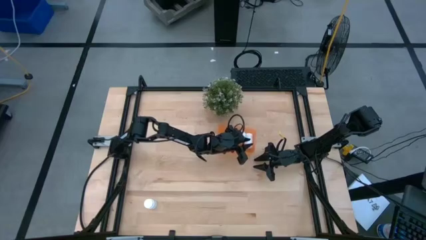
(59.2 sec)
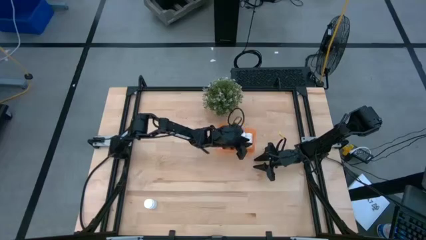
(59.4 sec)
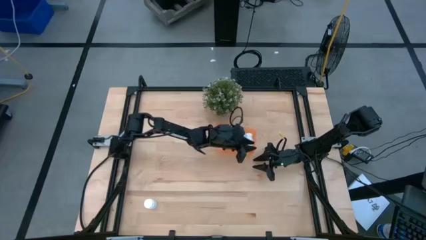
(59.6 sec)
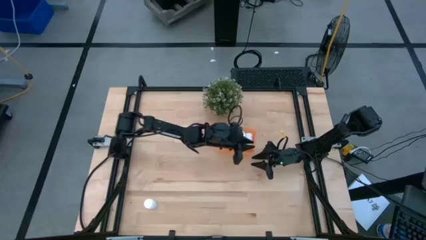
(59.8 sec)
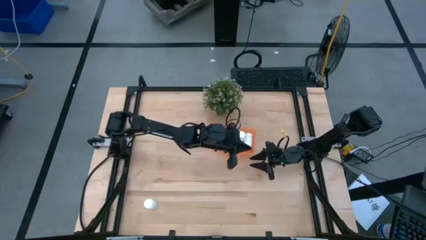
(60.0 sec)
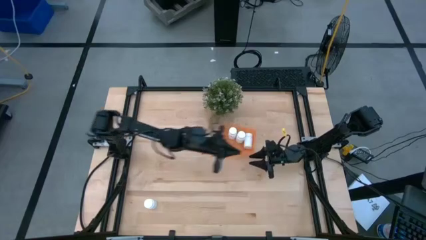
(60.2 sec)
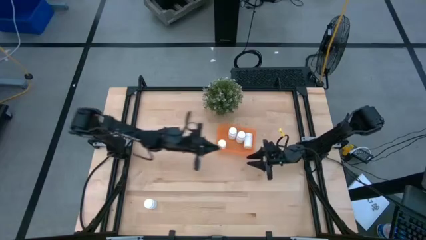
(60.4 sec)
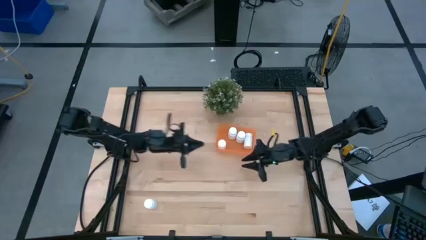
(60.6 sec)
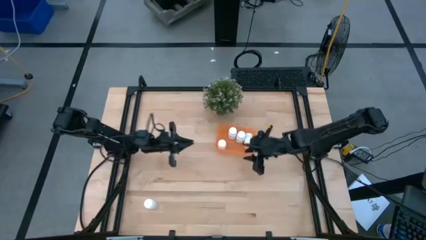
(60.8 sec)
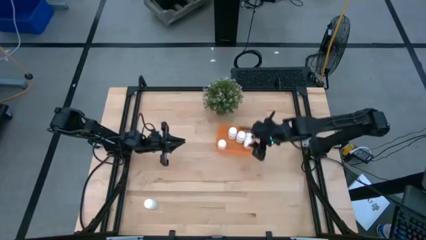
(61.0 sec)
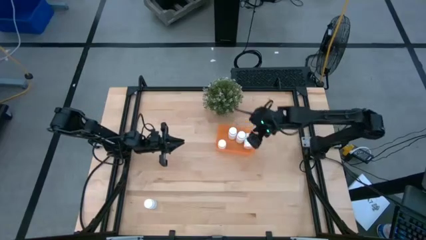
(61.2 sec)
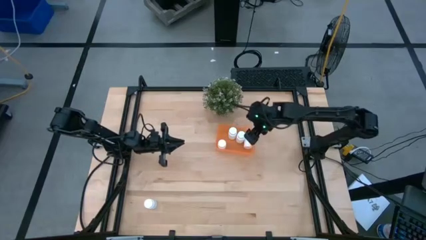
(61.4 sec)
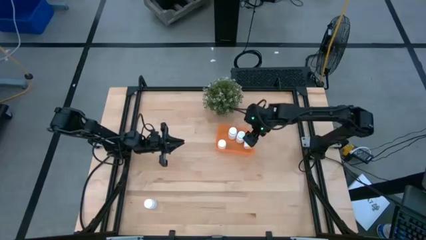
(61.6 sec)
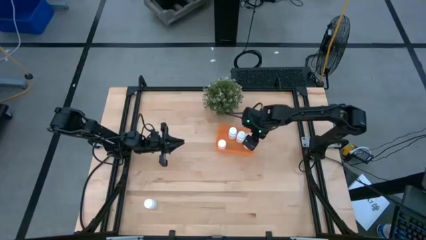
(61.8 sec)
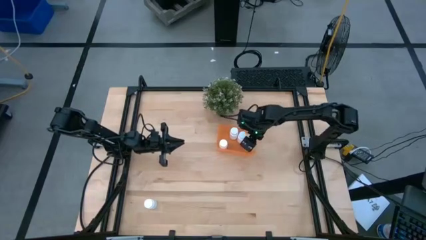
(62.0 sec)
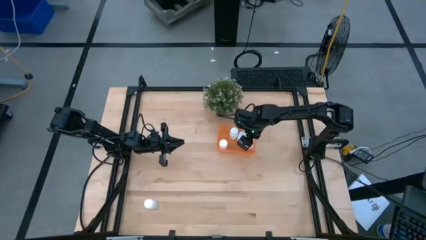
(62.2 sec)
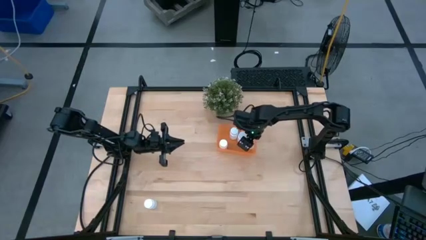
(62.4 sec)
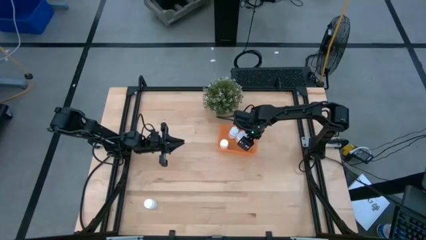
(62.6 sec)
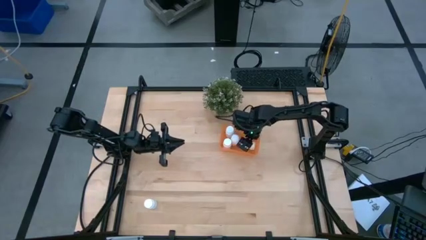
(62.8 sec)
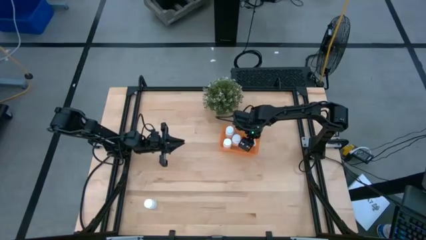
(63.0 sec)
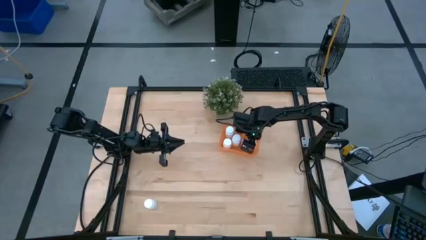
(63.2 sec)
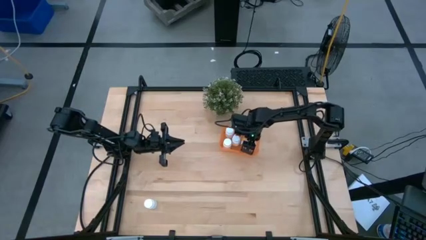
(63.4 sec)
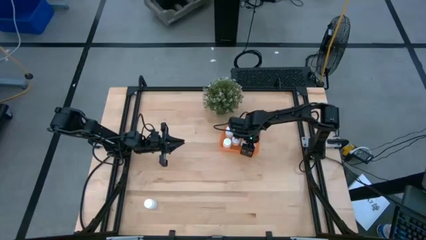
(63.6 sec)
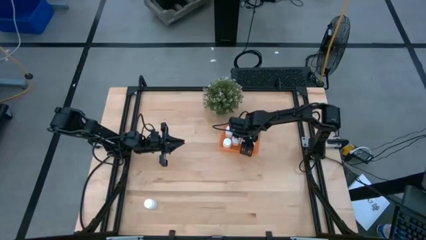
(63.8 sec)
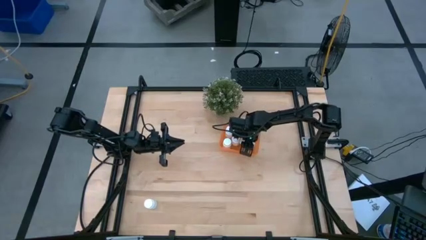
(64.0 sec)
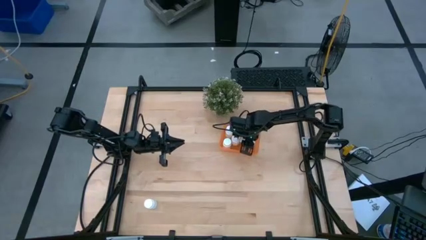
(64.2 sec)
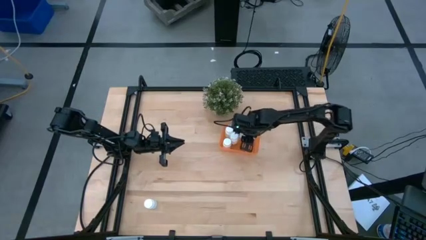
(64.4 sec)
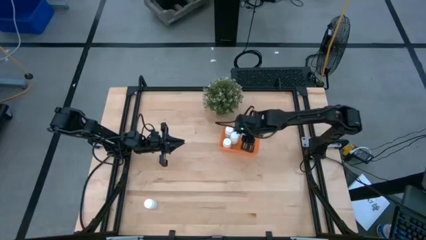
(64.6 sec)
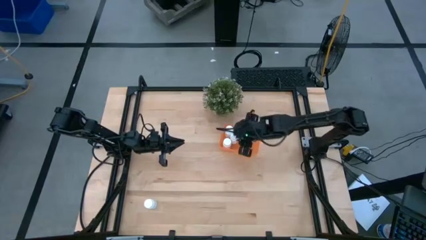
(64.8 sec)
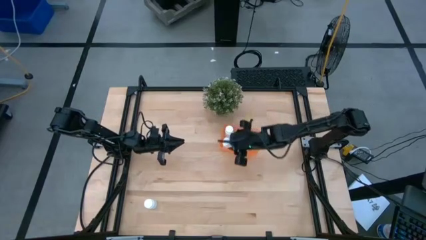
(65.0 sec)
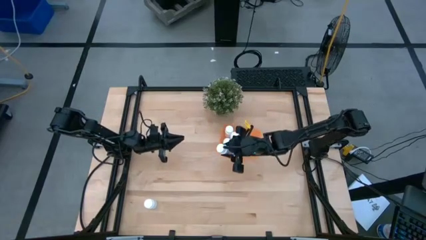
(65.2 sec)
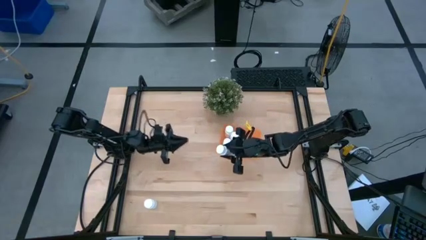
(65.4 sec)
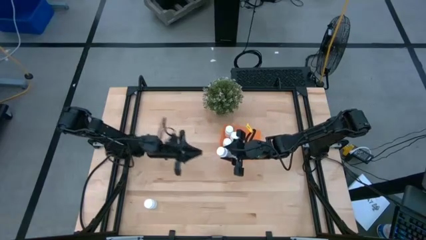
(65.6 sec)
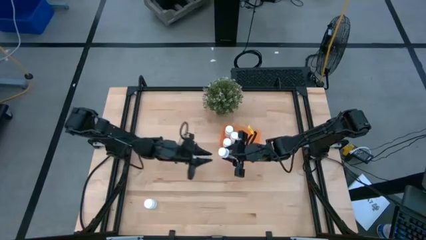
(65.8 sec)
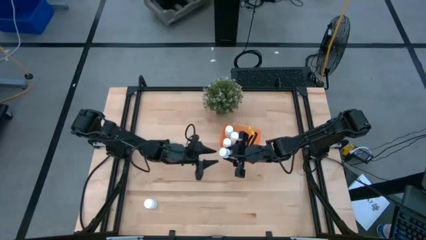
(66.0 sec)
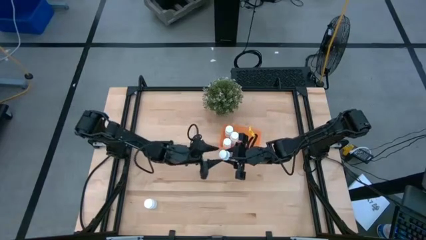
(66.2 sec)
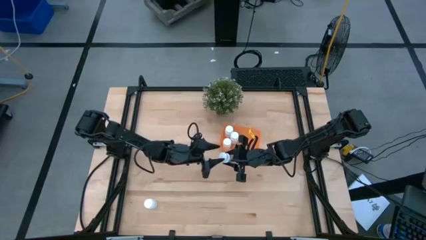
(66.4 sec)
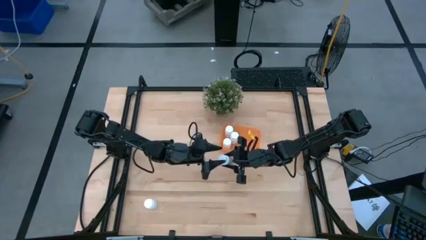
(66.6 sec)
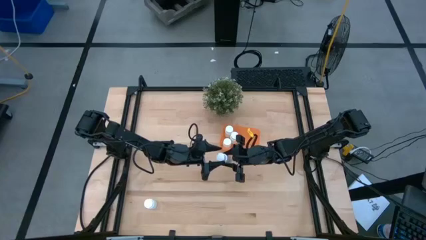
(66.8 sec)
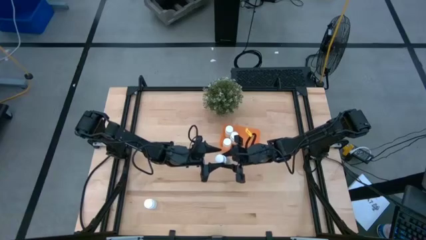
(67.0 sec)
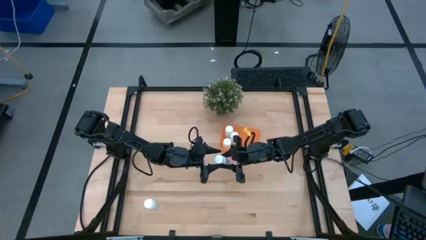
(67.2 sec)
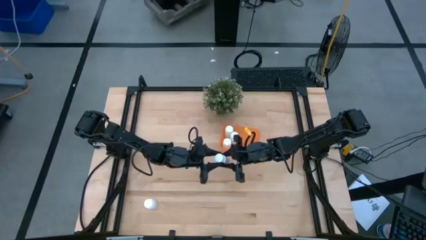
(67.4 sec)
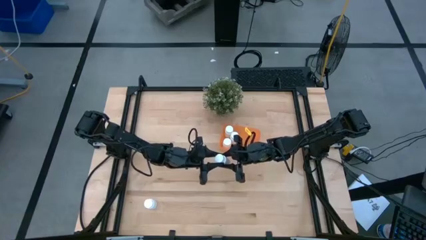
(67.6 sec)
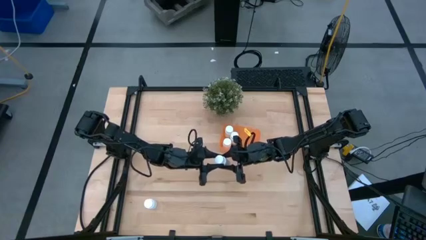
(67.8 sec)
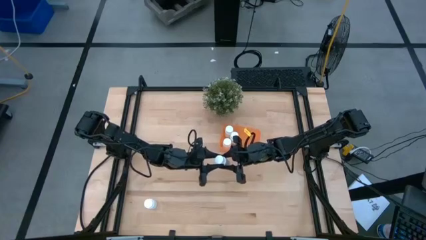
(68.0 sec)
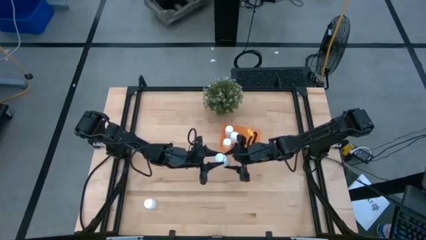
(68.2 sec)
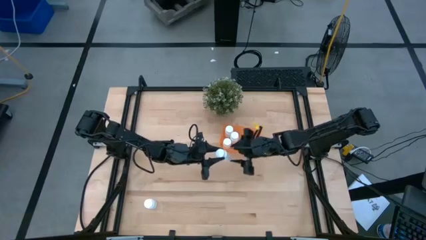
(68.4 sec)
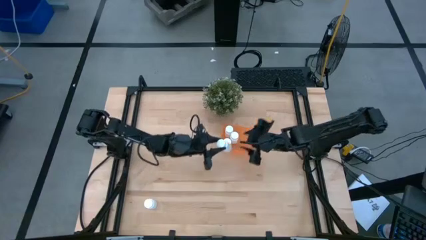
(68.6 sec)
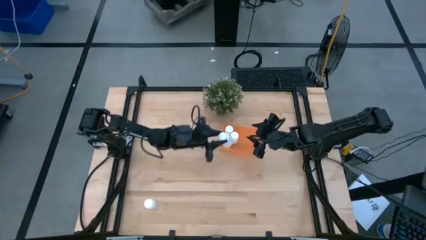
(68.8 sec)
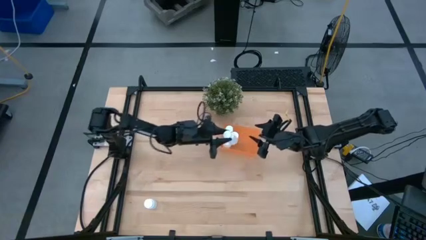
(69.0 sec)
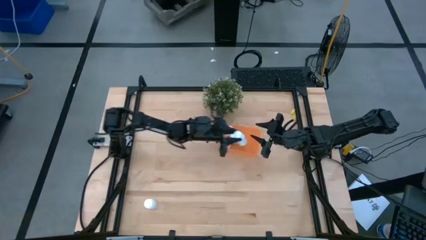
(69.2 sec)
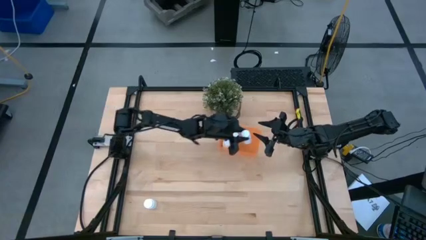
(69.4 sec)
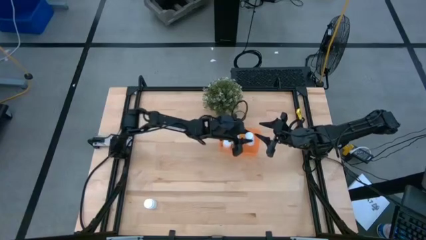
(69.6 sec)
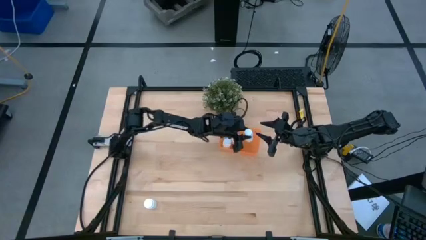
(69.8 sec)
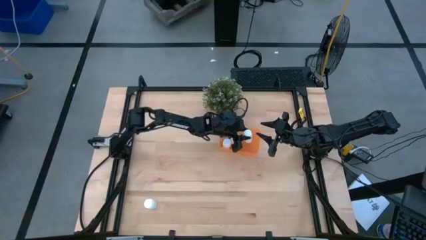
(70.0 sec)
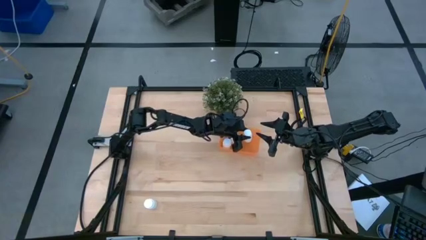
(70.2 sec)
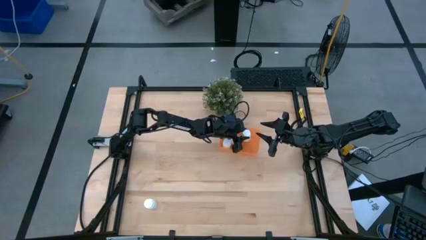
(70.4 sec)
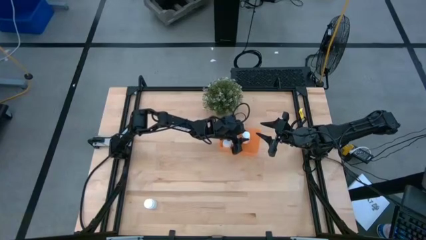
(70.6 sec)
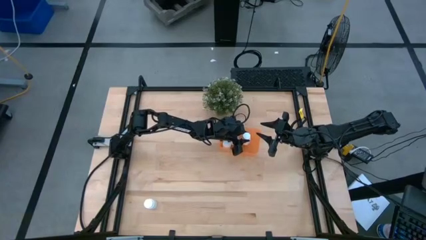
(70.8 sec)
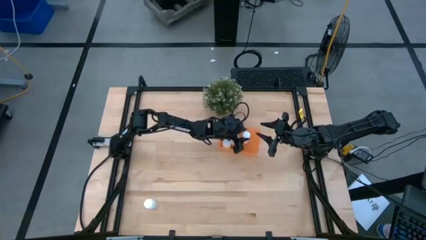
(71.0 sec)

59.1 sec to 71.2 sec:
Task: Pick and place pill bottles into a basket
Put the white pill bottle into the orange bin
